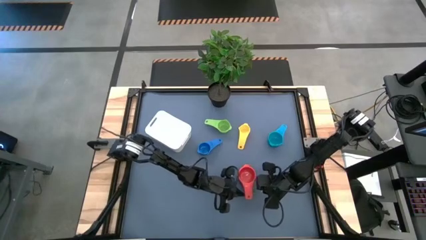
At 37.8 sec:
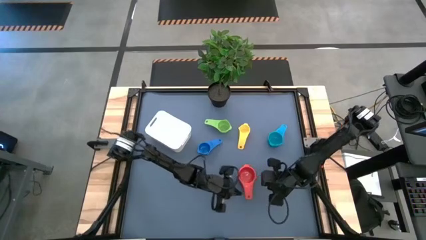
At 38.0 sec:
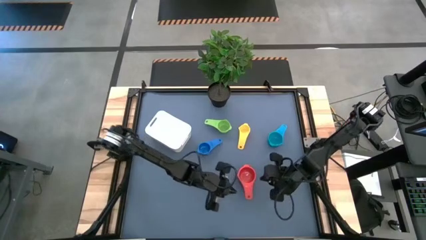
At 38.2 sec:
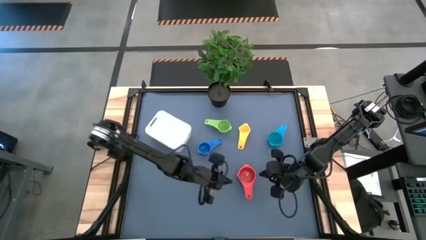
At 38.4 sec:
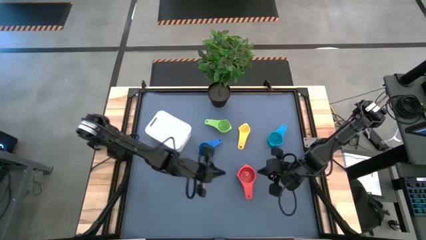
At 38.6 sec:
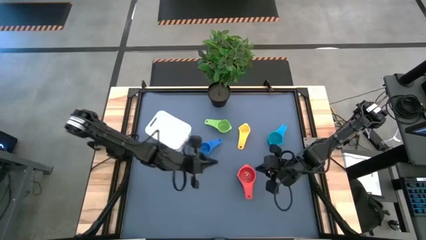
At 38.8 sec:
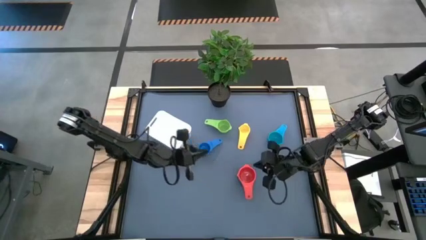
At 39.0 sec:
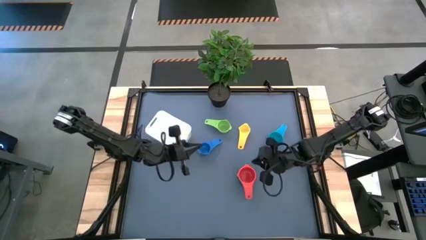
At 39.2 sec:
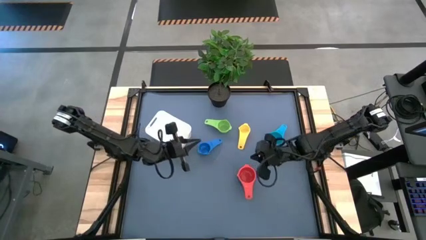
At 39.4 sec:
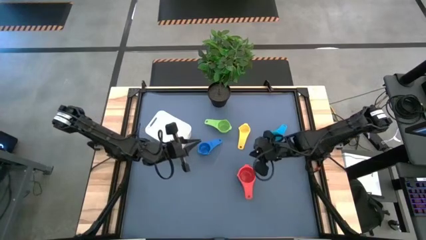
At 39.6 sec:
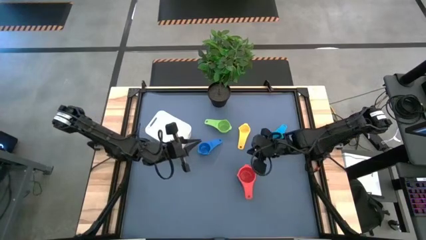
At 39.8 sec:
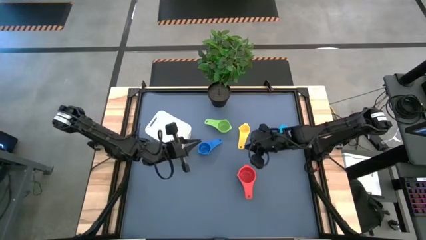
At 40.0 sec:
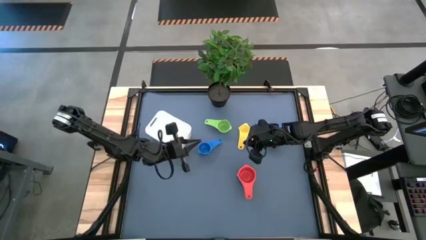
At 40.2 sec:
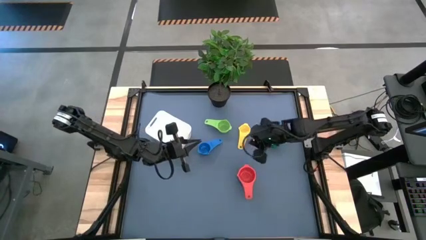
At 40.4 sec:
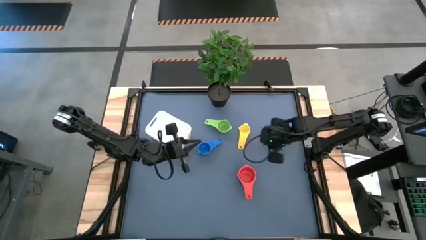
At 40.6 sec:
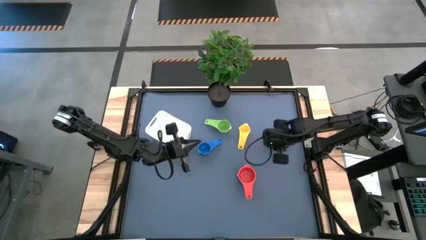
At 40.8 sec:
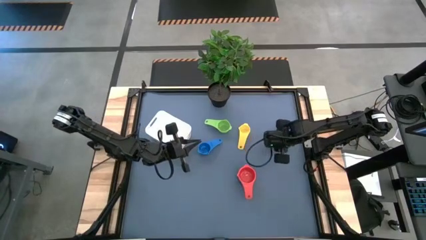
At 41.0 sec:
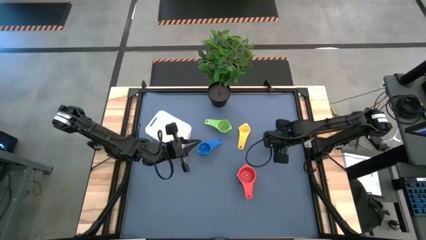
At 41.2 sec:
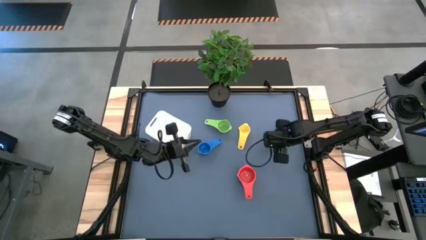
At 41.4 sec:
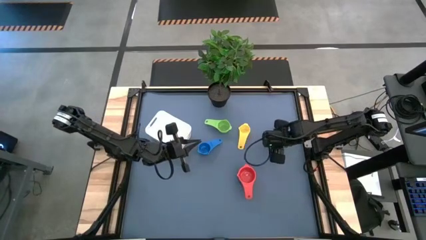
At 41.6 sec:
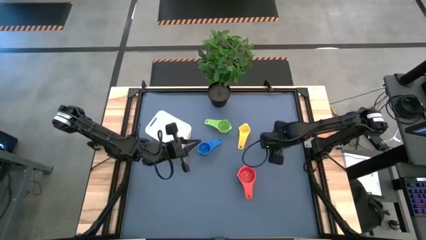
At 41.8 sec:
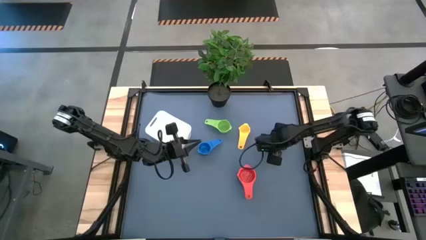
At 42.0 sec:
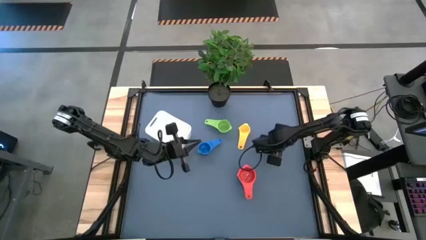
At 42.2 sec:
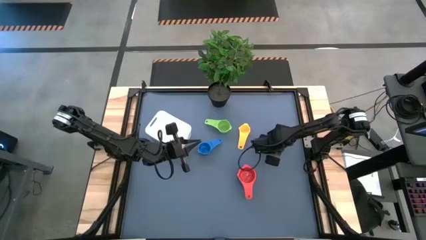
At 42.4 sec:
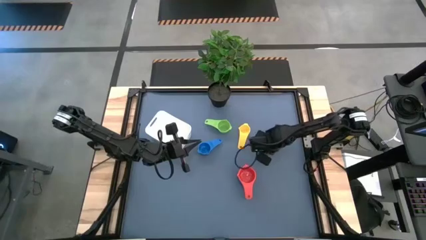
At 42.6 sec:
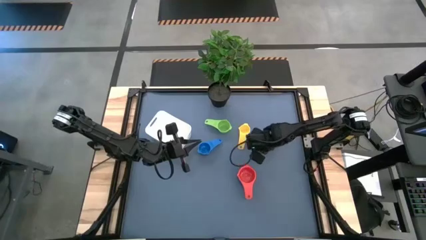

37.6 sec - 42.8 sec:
Task: Nest measuring cups in basket
Stack the light blue measuring cup on the red measuring cup

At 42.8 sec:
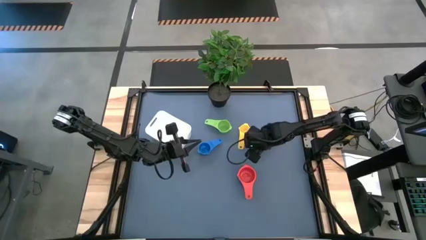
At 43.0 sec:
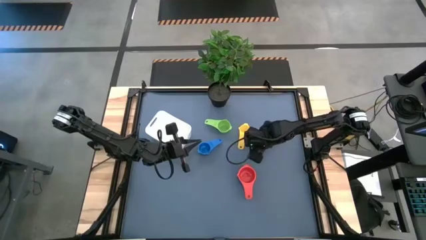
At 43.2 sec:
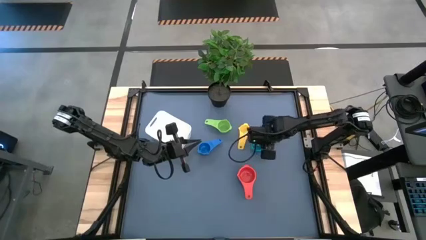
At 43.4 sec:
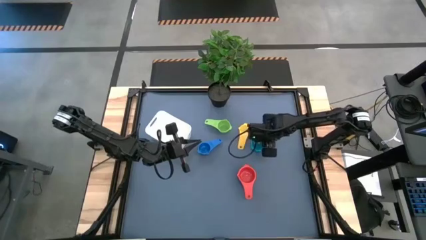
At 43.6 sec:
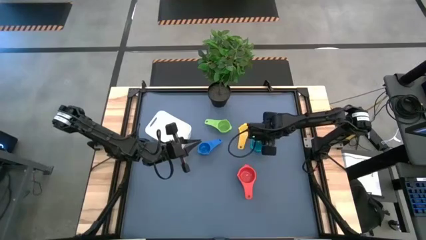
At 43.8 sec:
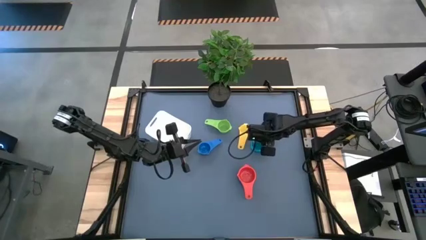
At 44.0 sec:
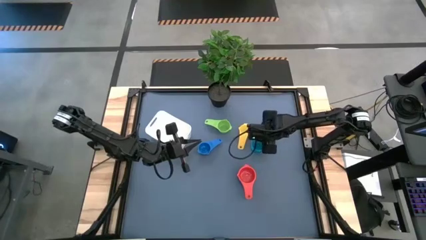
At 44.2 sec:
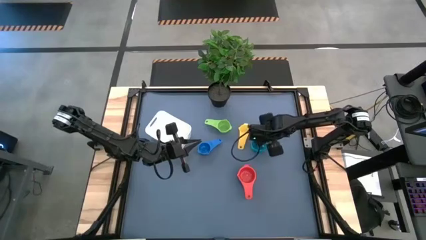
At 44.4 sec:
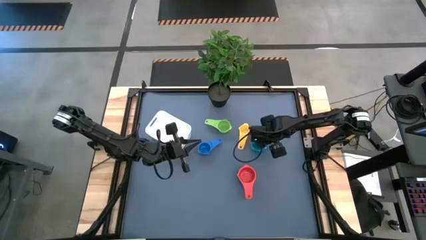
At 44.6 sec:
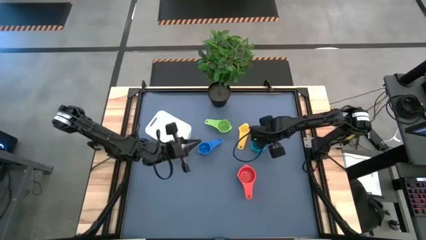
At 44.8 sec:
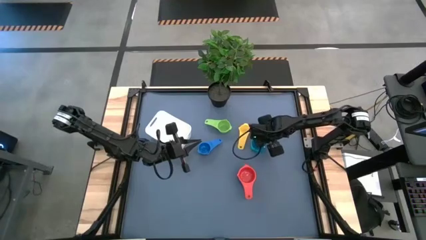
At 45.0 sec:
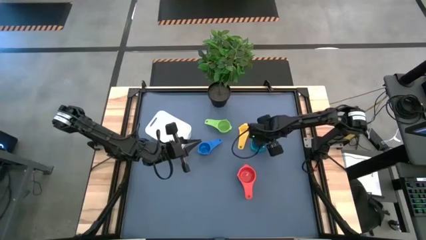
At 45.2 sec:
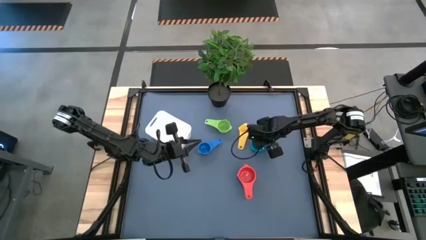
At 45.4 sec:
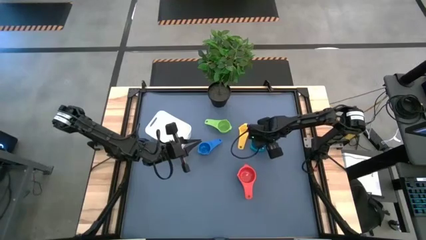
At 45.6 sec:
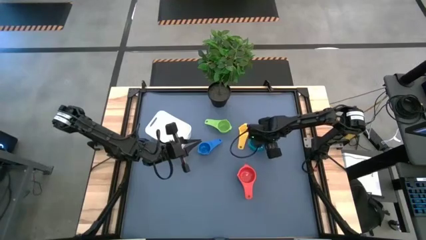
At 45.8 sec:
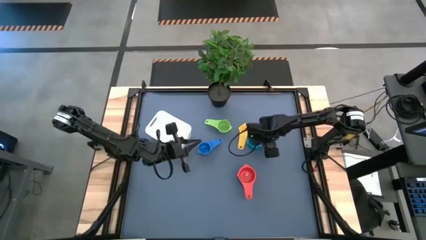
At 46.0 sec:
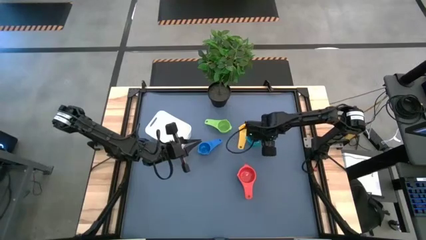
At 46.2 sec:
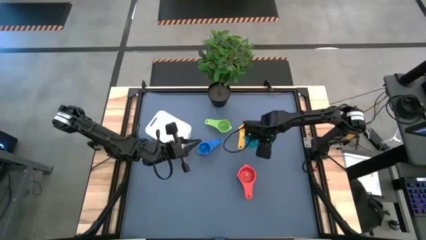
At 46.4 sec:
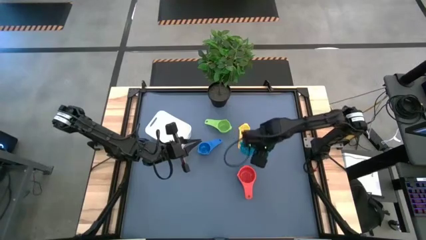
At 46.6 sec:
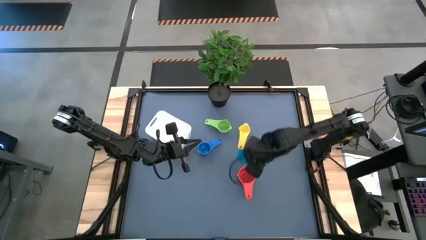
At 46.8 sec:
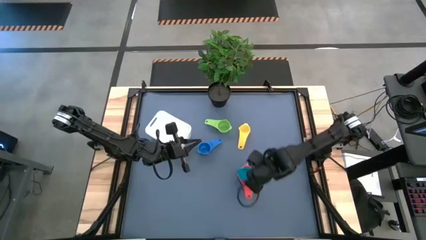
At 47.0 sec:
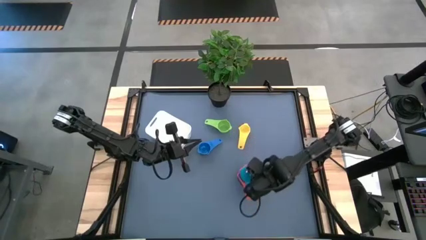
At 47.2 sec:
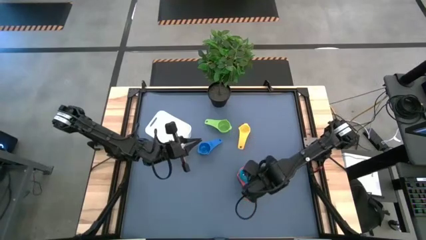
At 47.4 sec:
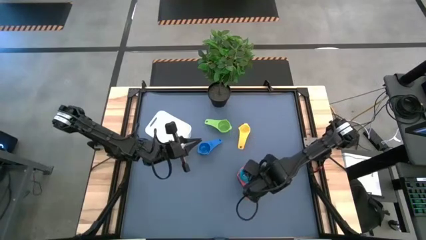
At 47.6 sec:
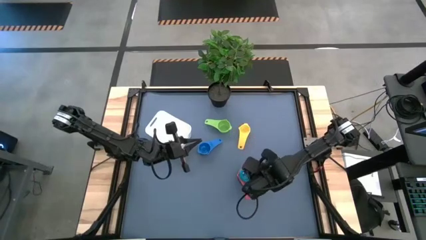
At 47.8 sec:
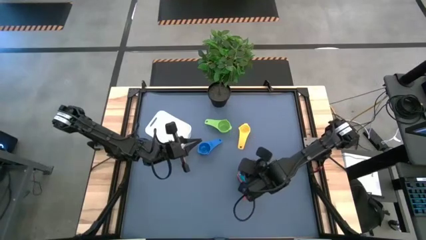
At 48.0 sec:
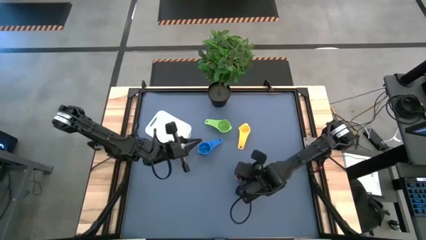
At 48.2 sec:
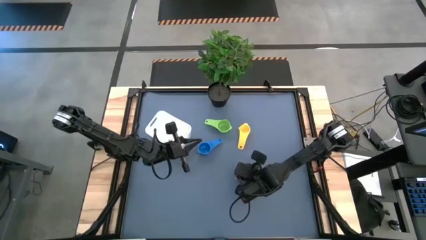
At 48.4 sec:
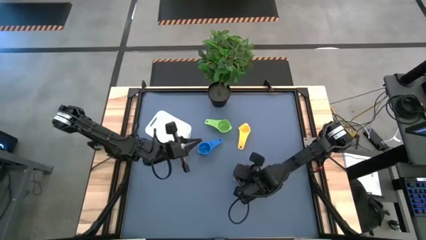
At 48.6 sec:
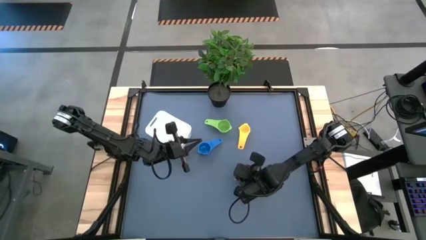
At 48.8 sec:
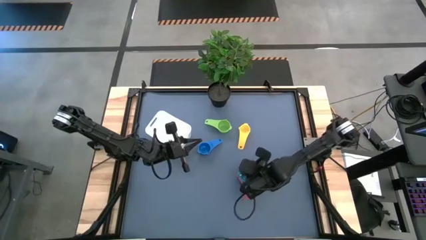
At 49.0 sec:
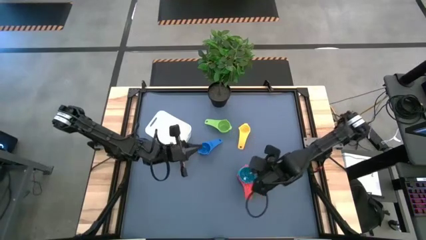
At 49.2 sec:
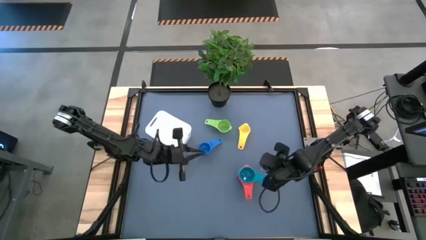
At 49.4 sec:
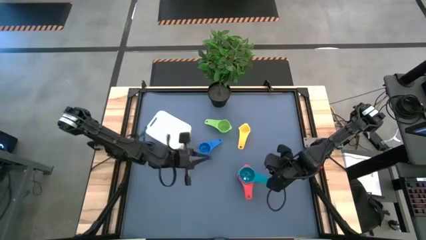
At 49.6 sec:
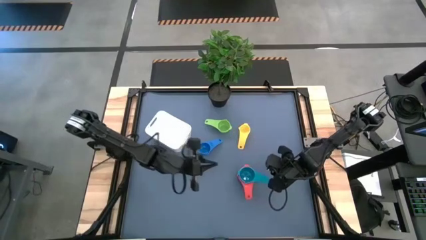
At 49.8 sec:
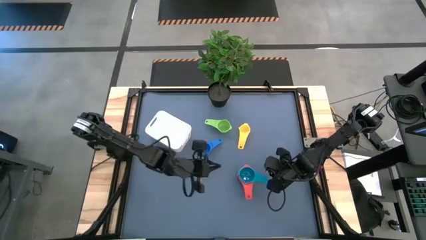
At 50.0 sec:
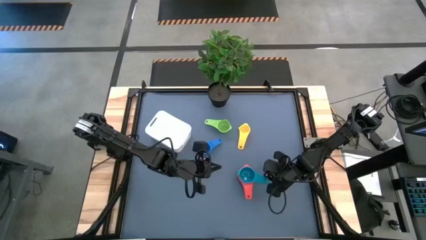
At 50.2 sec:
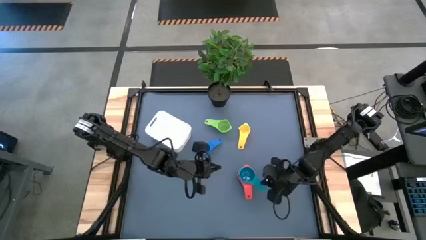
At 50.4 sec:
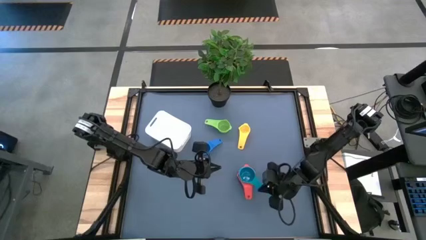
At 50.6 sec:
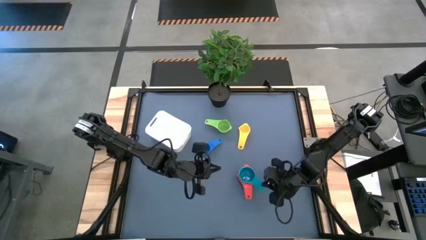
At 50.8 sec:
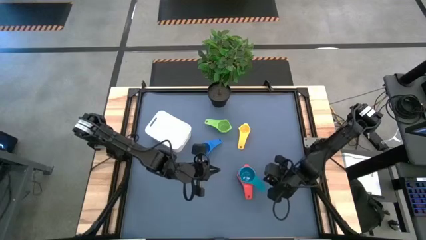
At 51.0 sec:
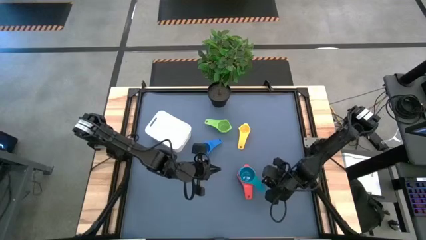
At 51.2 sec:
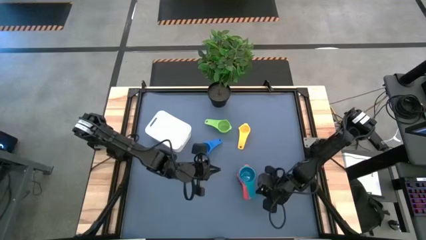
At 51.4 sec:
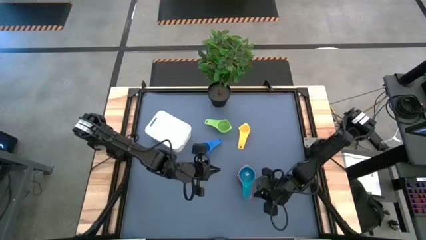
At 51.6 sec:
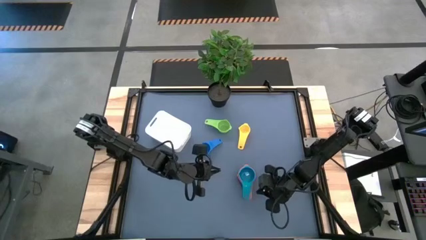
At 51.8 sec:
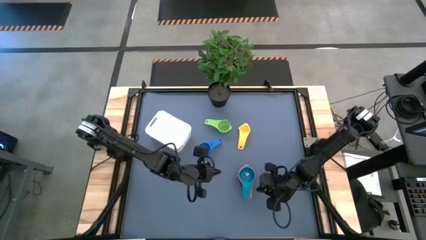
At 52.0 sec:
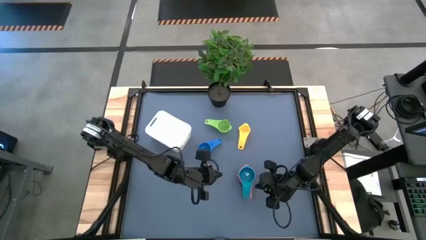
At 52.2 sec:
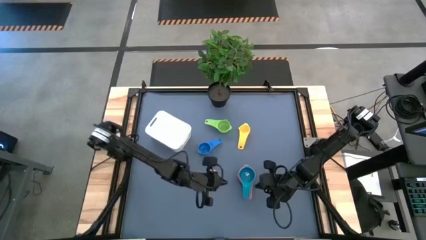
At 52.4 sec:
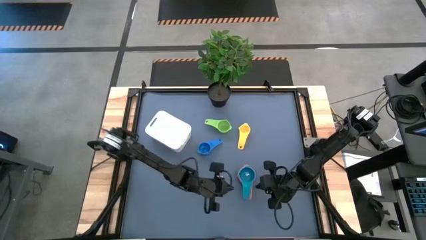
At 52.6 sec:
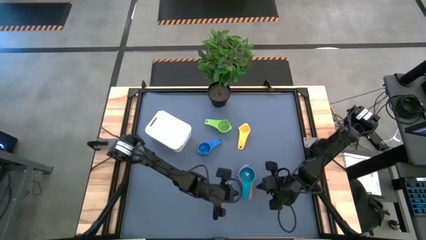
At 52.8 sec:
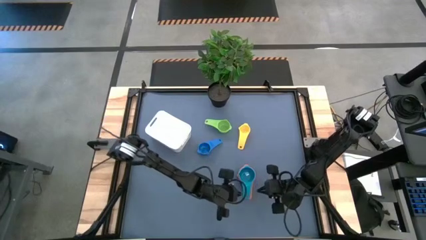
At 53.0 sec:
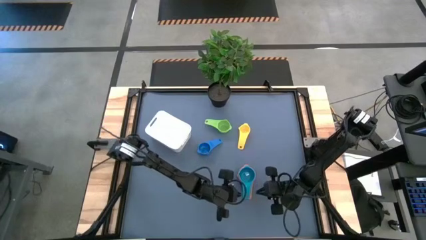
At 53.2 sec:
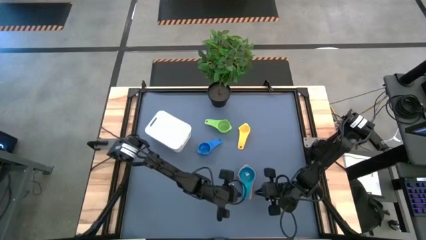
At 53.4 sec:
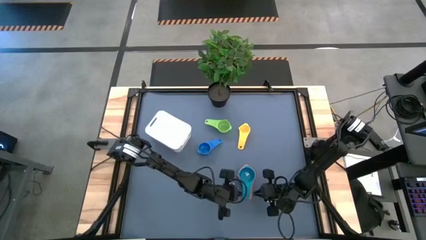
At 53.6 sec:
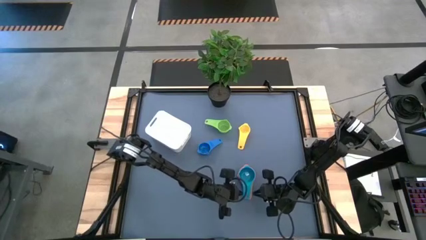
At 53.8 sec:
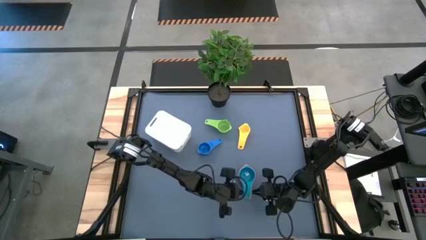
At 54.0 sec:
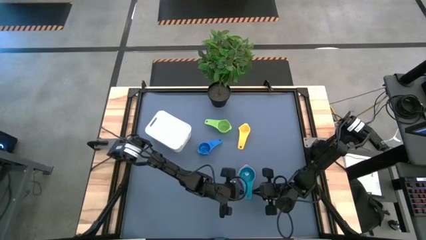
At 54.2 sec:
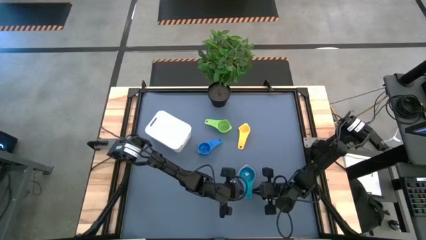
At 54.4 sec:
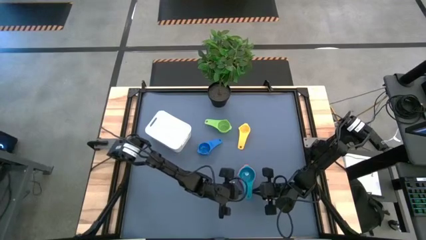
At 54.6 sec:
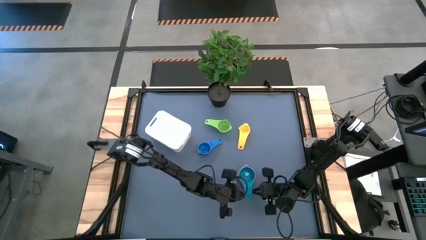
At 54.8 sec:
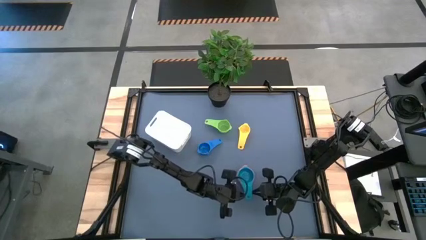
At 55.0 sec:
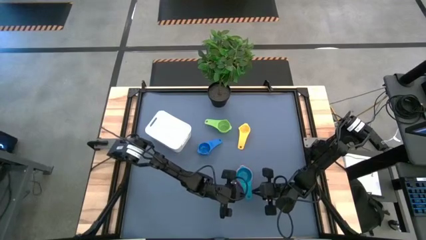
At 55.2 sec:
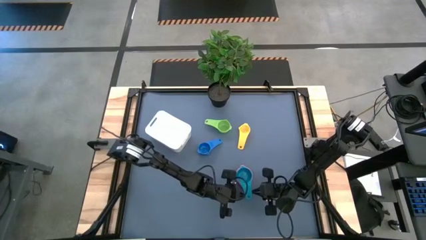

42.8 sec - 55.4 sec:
Stack the light blue measuring cup on the red measuring cup
